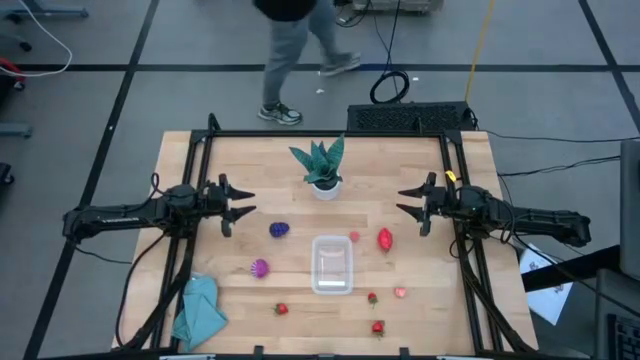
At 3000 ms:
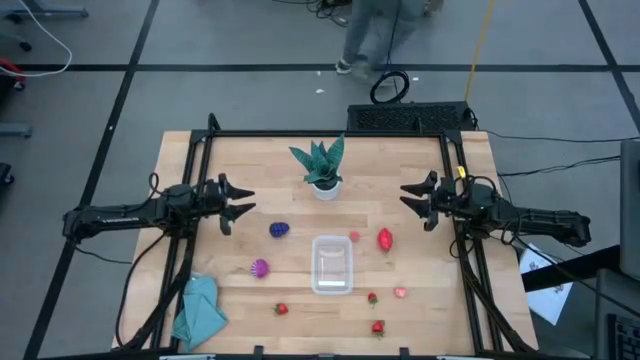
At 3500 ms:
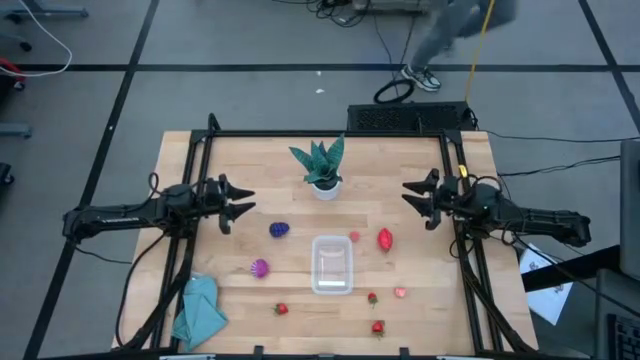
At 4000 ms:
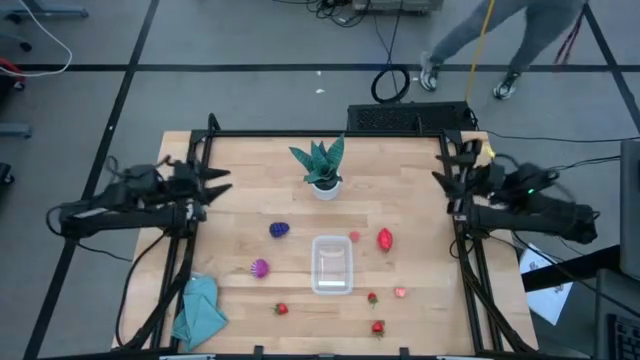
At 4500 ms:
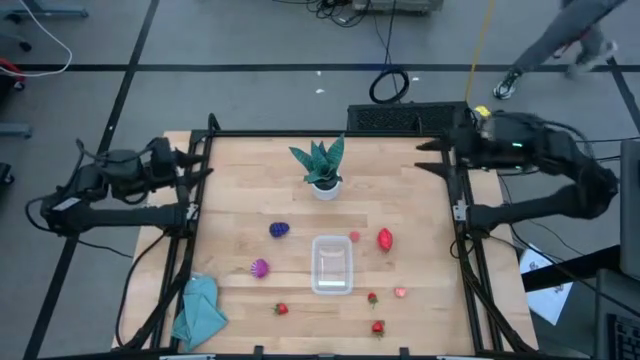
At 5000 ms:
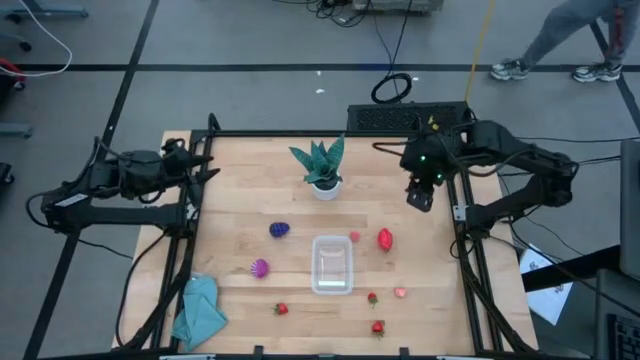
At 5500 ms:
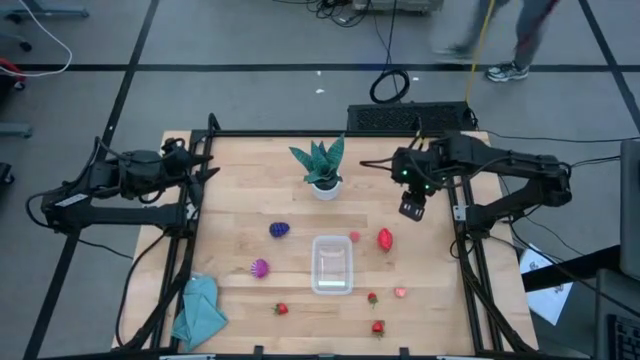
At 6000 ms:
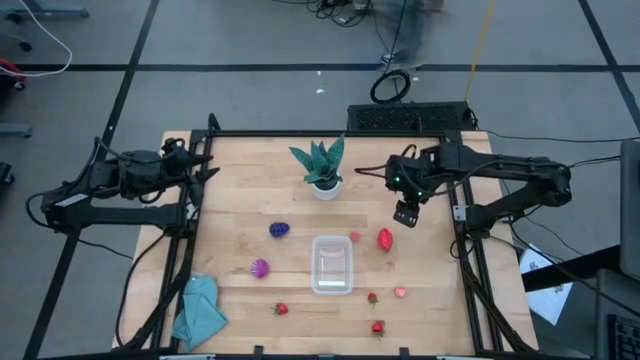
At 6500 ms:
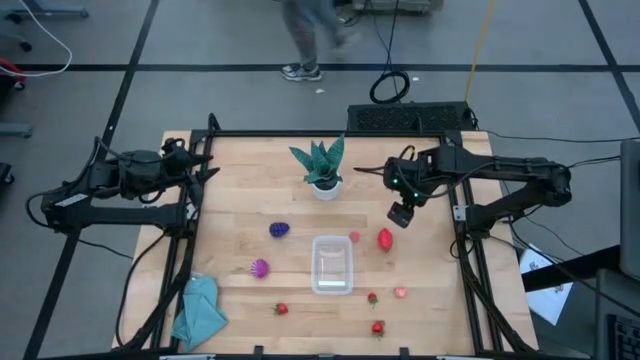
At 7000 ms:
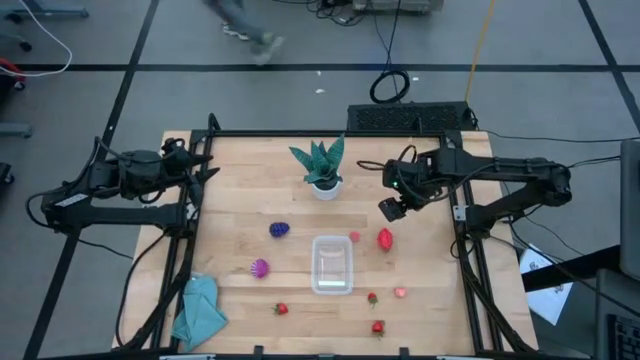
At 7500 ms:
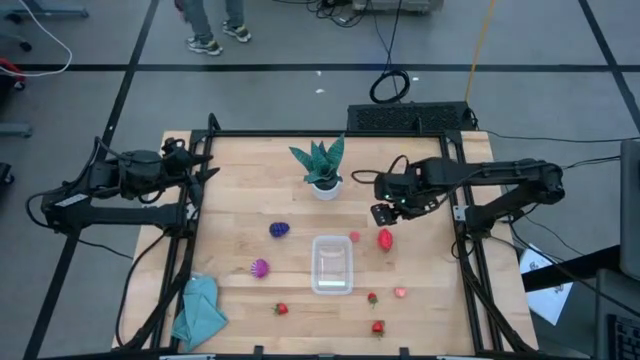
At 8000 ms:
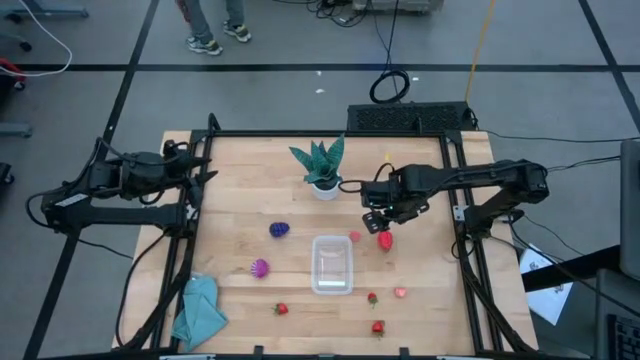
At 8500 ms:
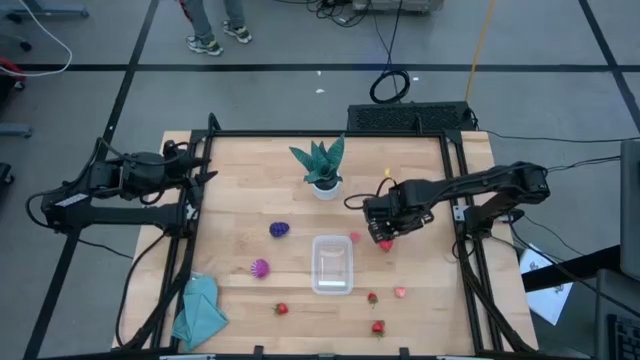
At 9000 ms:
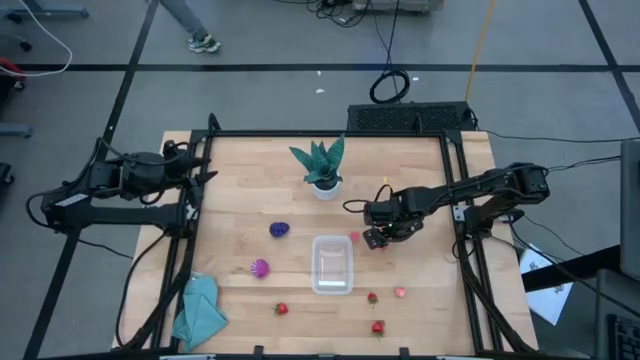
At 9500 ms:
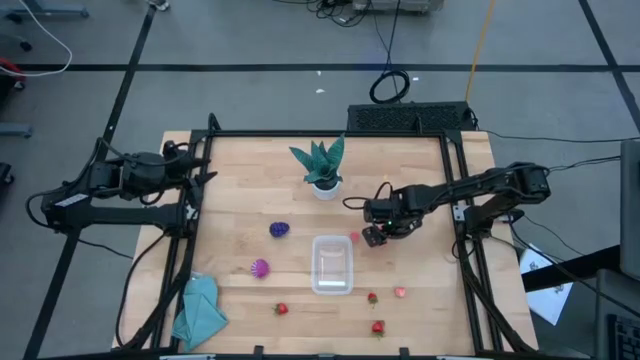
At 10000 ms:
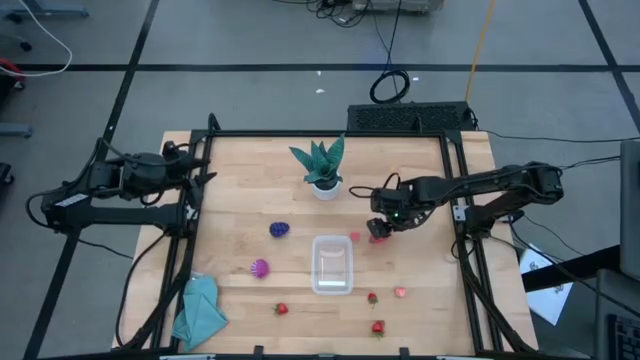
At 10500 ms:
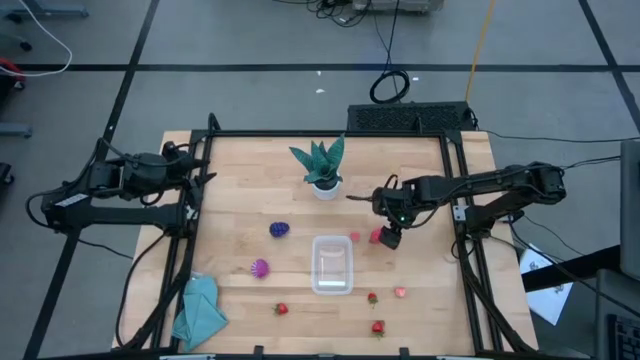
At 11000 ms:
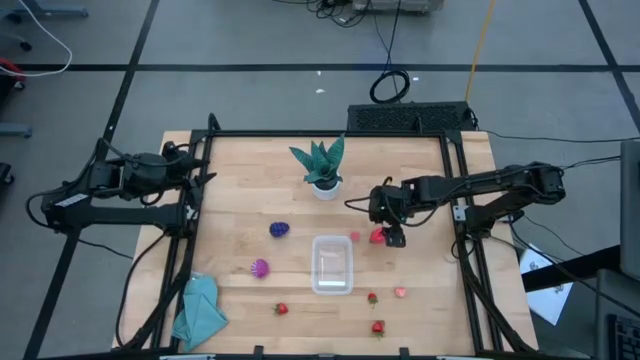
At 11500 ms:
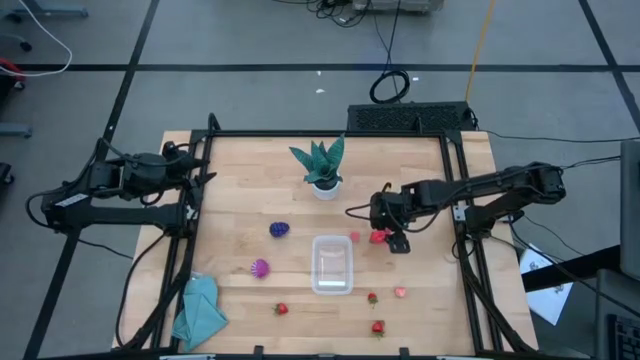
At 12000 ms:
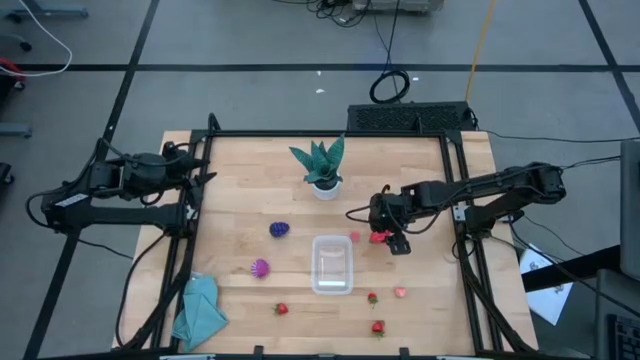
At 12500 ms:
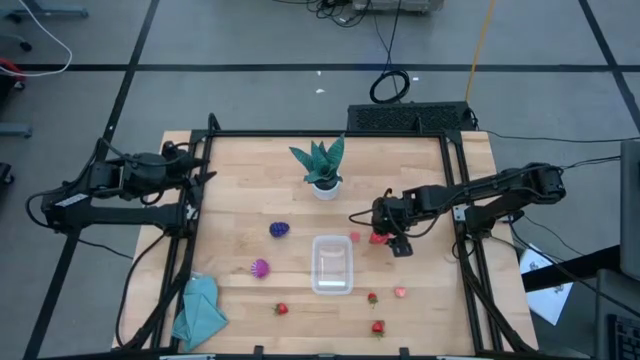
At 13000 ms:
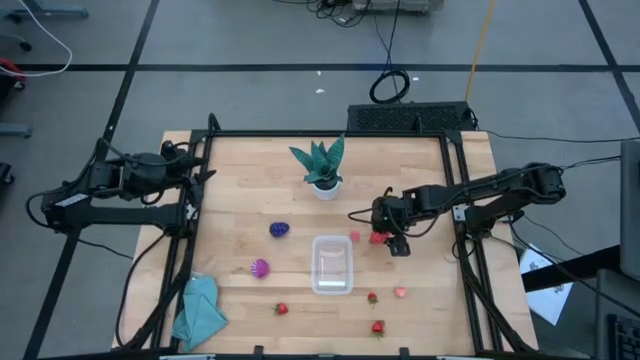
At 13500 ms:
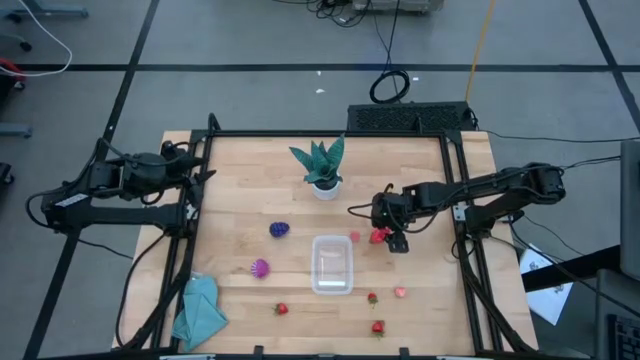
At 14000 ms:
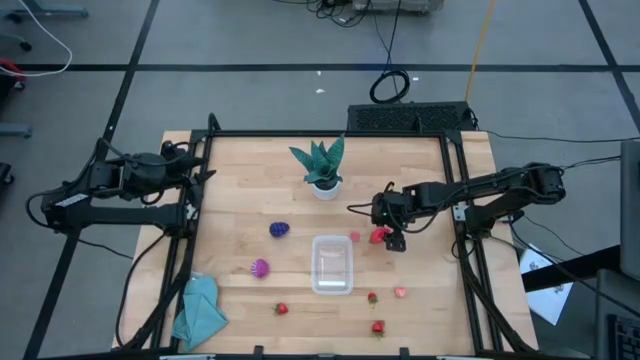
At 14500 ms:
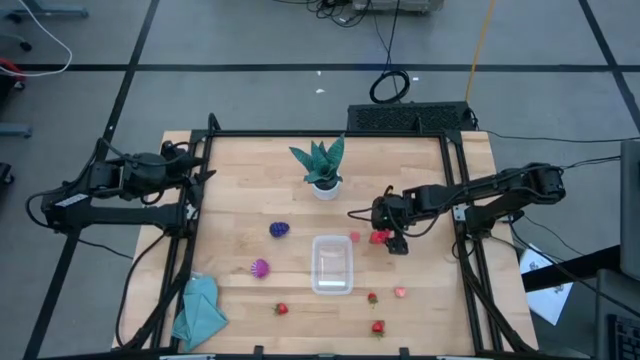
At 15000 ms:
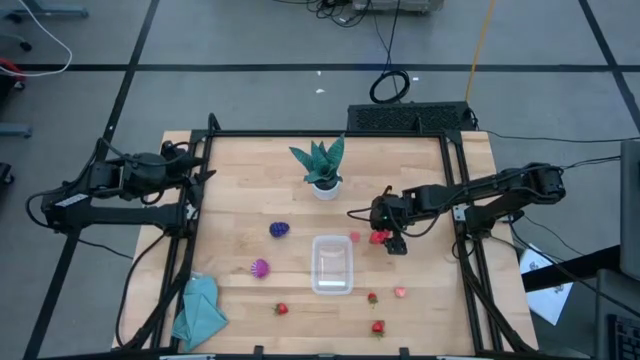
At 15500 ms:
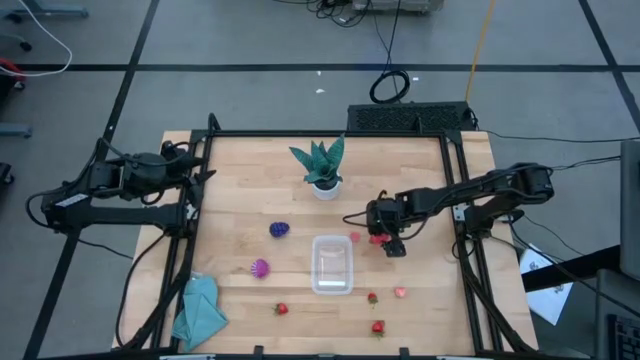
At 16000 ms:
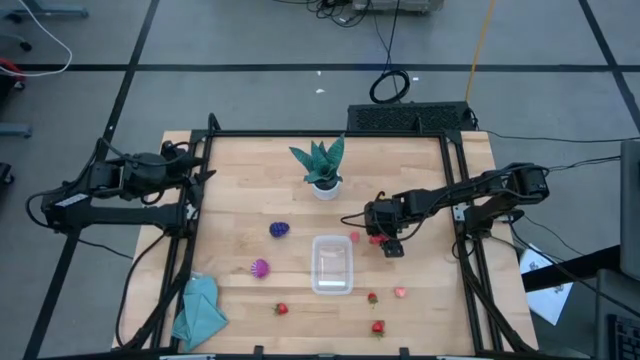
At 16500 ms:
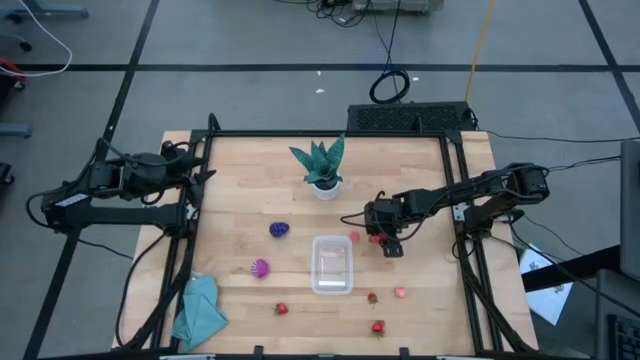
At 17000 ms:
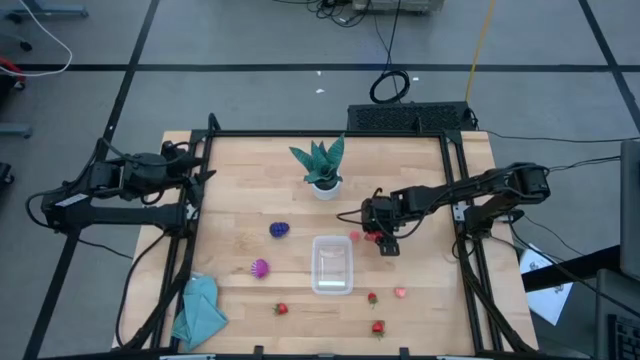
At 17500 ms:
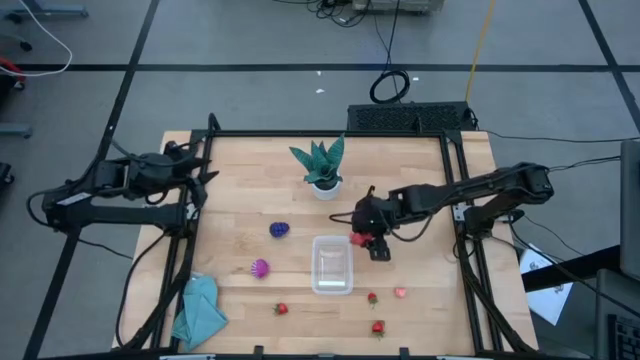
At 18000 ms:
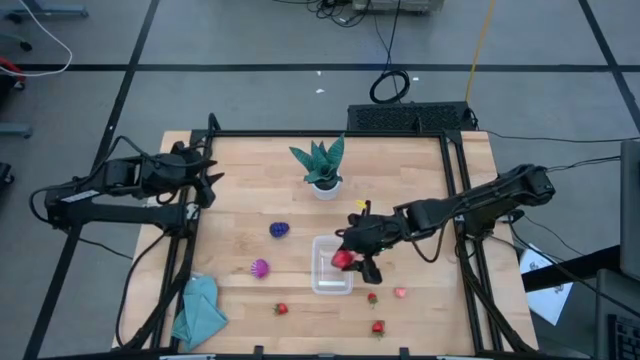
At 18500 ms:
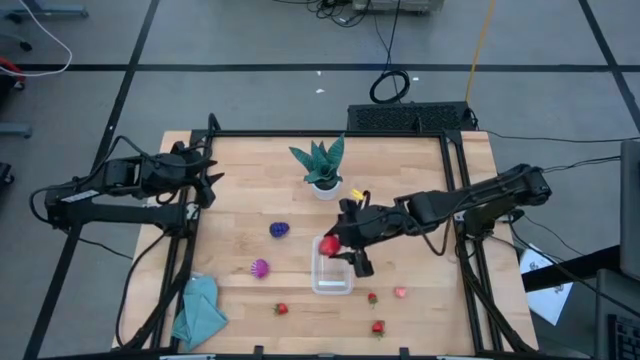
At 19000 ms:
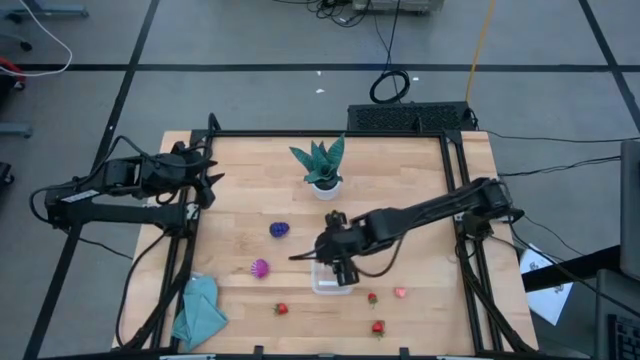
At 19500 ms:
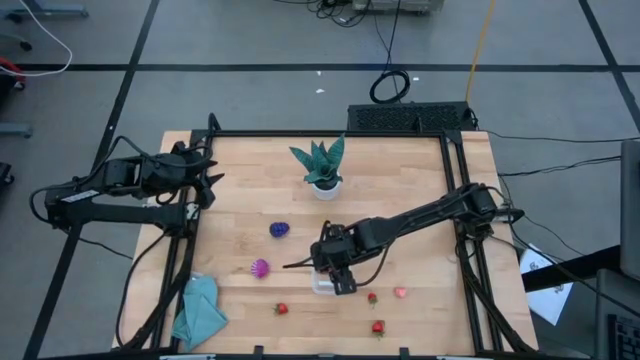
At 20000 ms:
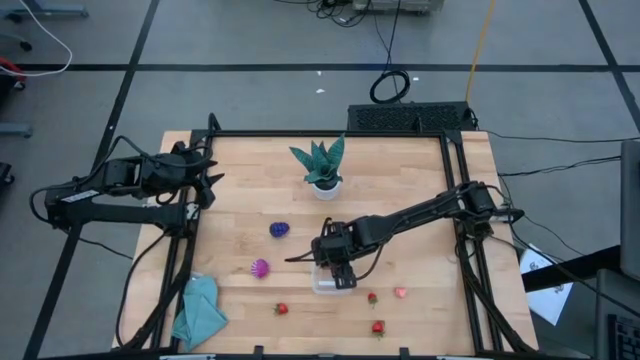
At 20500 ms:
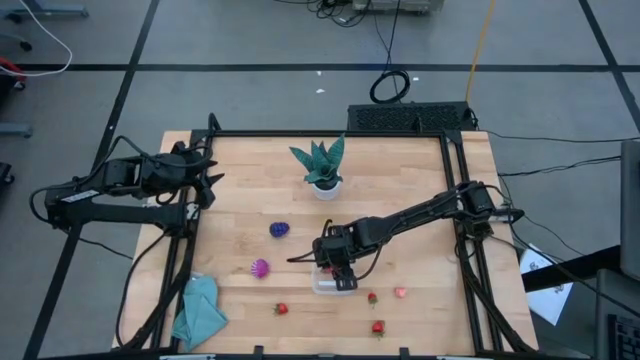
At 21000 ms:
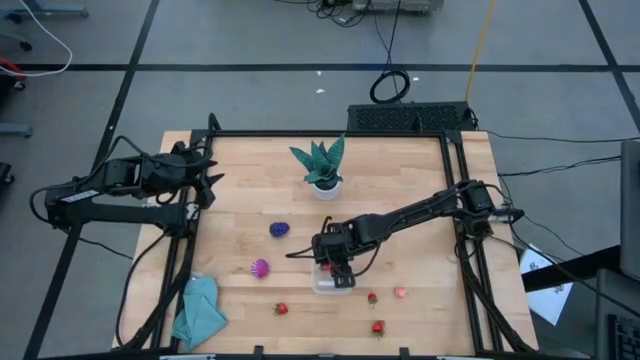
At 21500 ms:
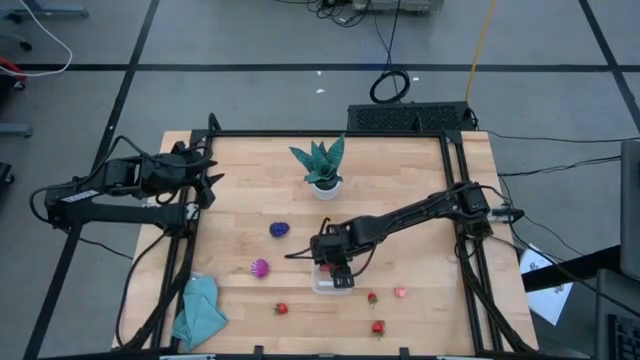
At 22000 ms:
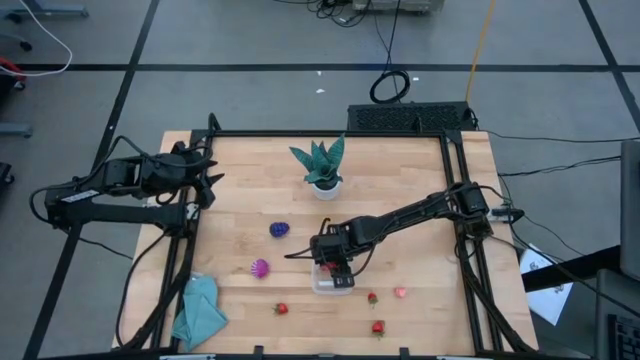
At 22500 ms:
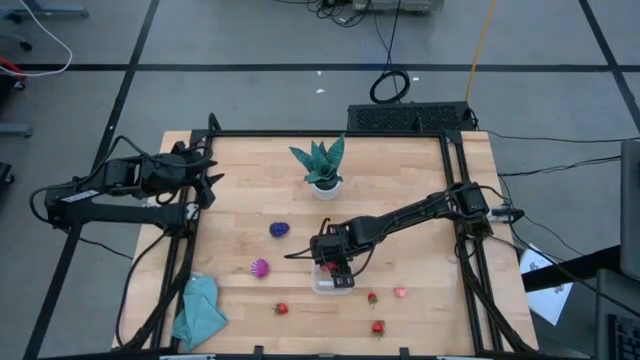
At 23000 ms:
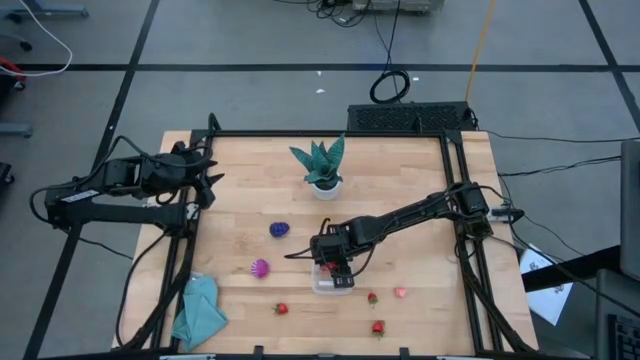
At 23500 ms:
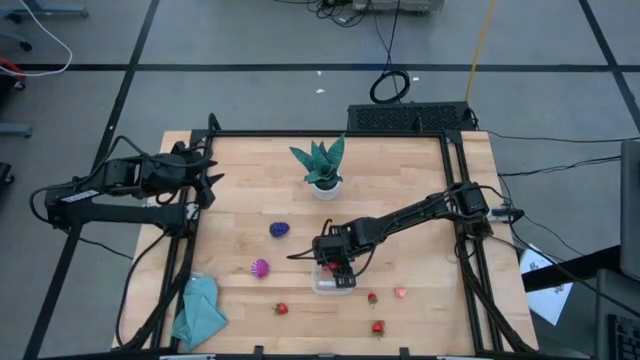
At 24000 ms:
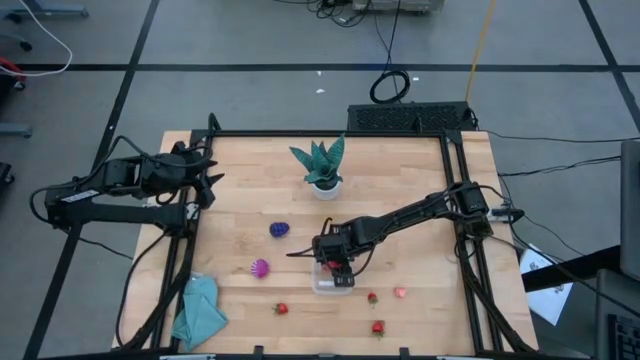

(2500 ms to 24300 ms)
Task: Pick and placing Produce into tupperware
Put the red dragon fruit into the transparent bin
